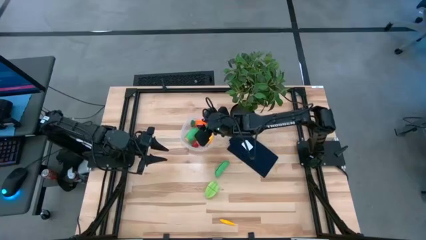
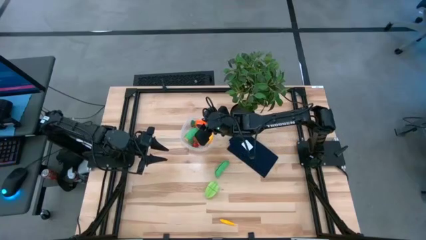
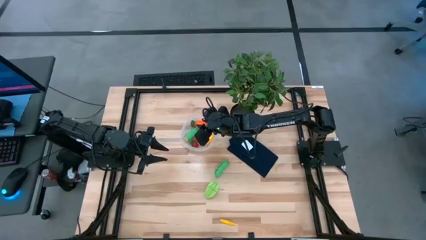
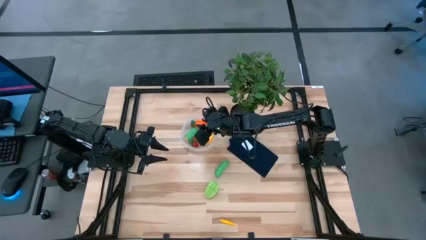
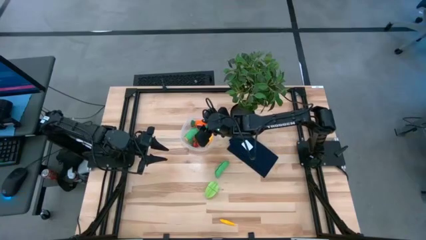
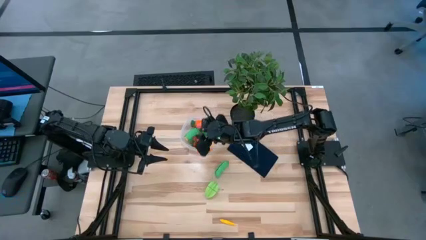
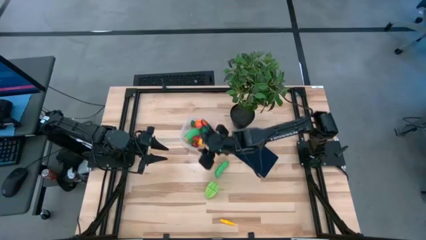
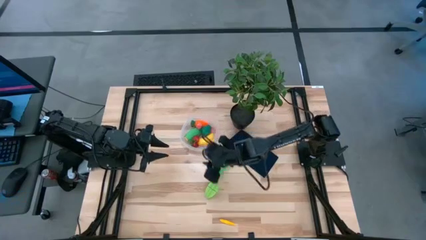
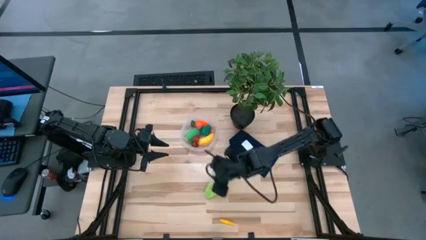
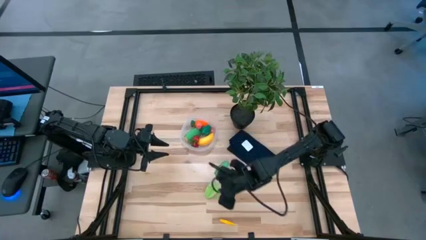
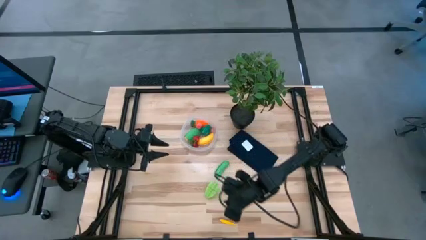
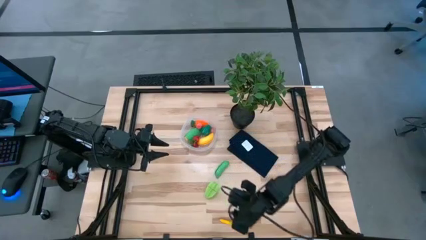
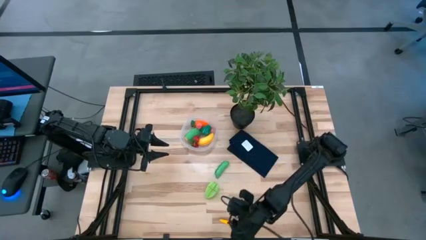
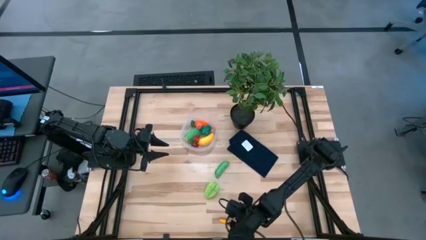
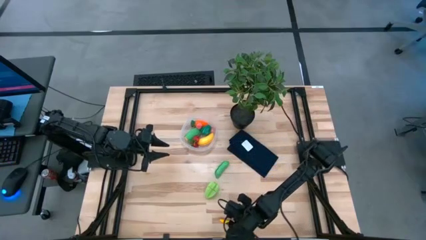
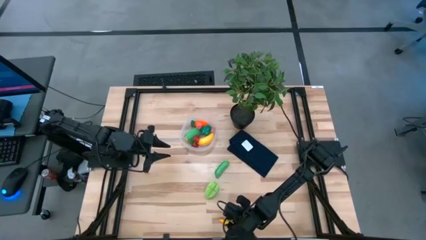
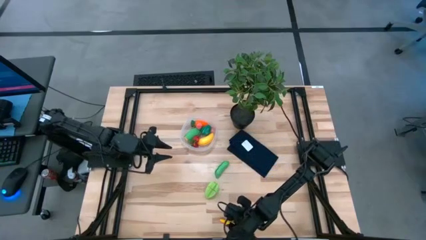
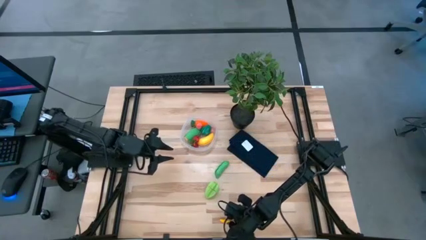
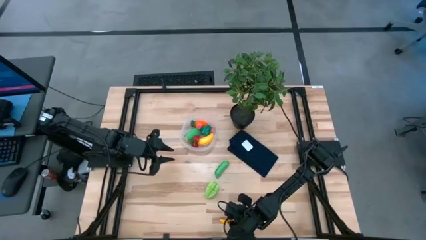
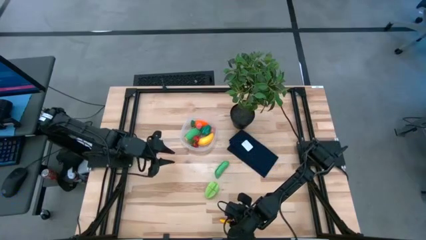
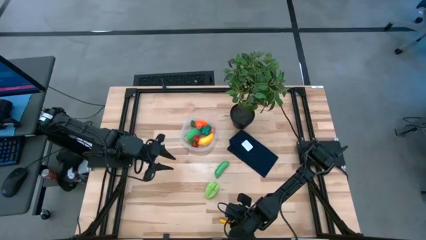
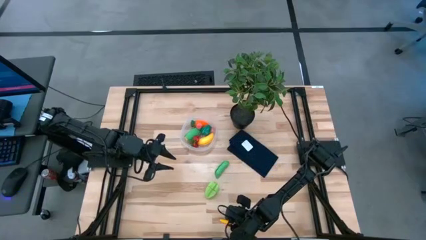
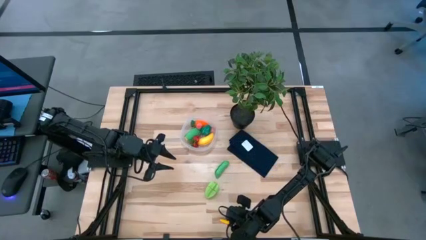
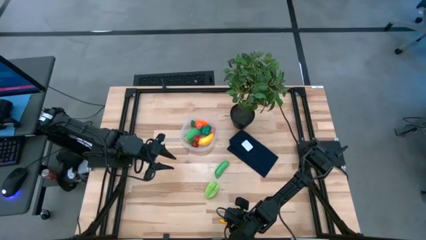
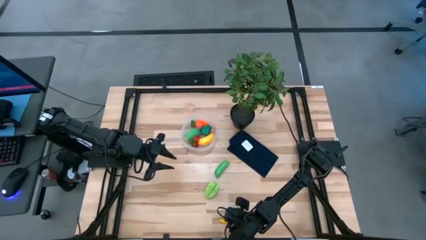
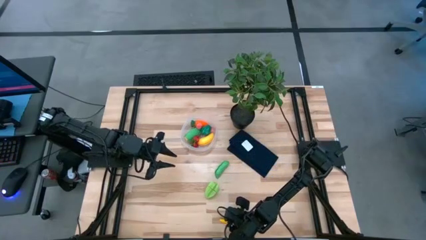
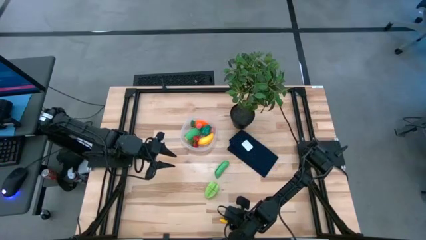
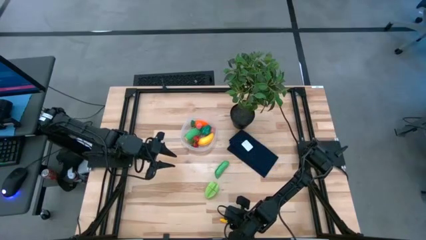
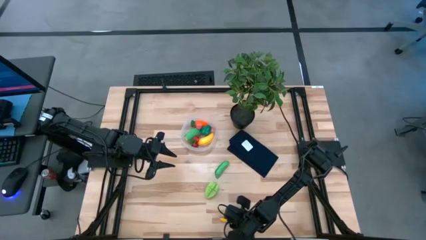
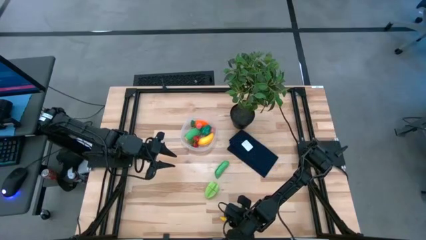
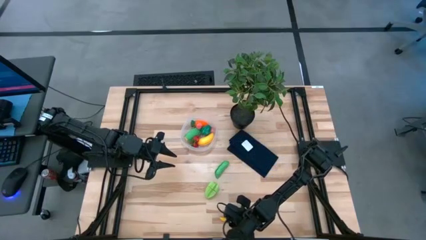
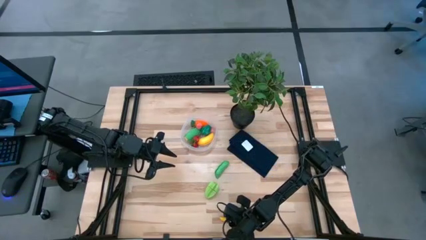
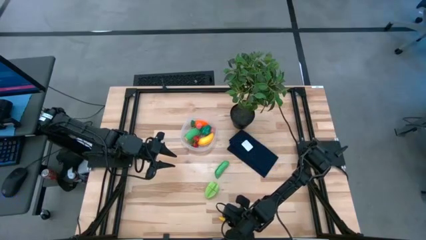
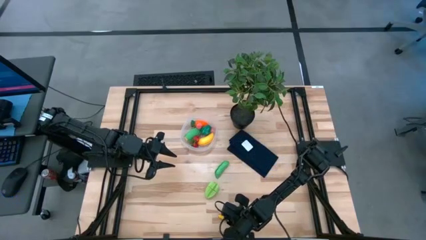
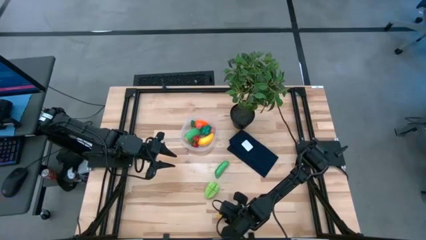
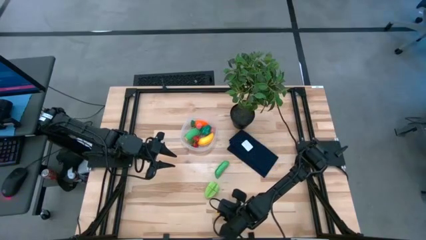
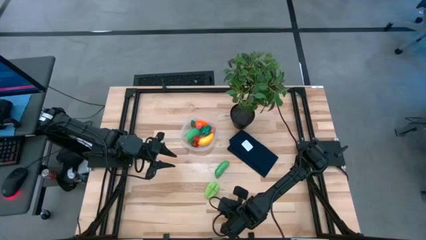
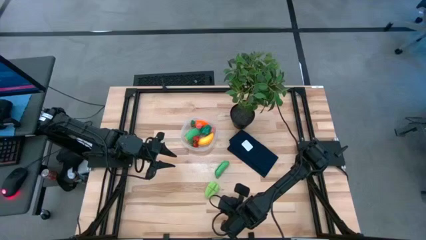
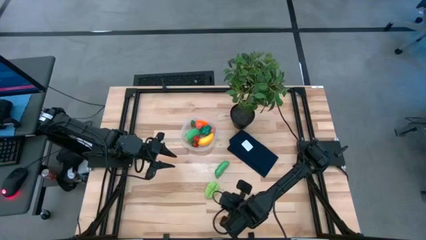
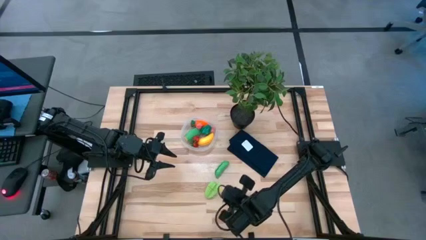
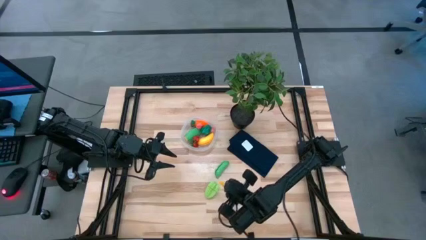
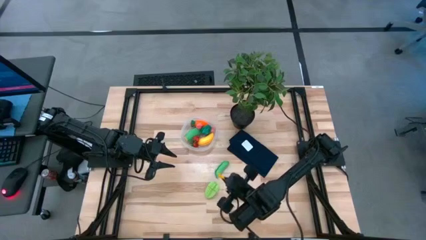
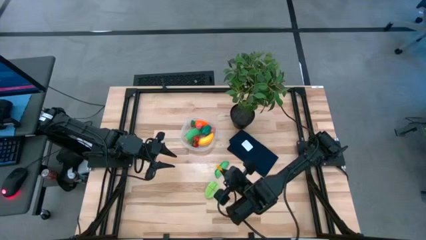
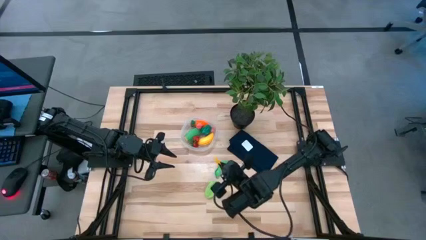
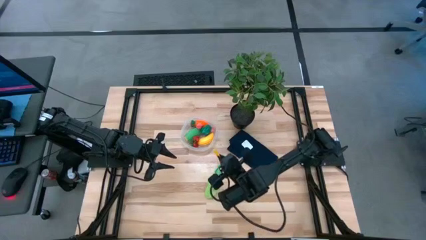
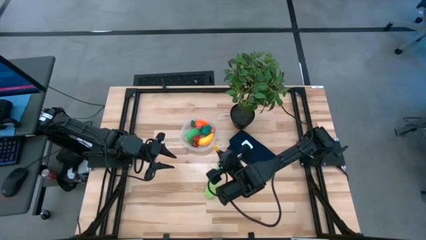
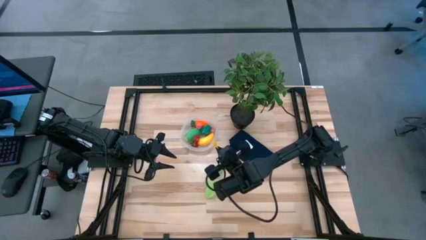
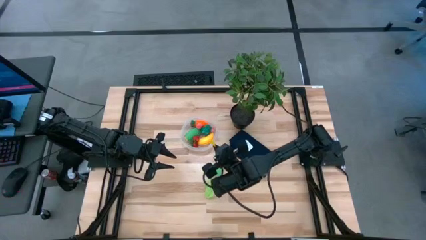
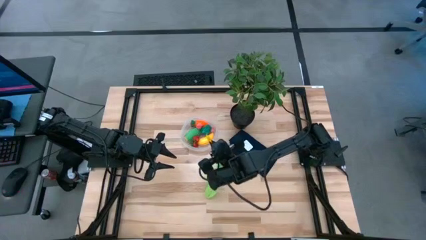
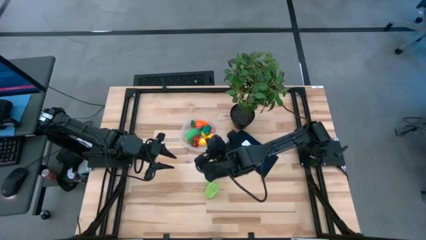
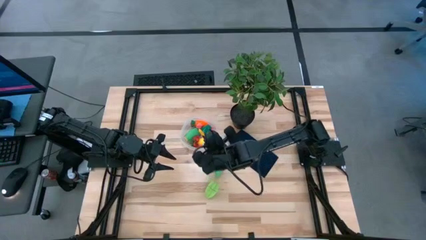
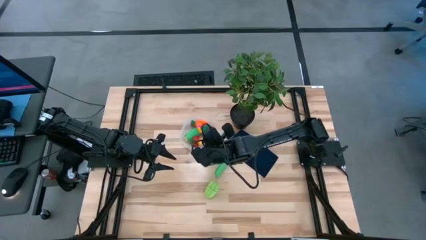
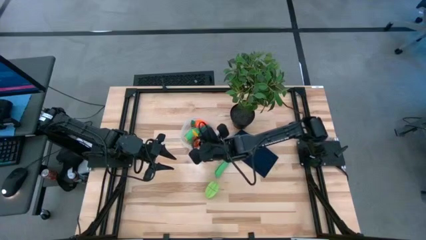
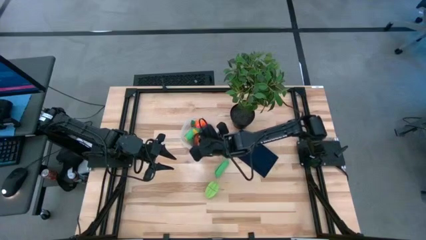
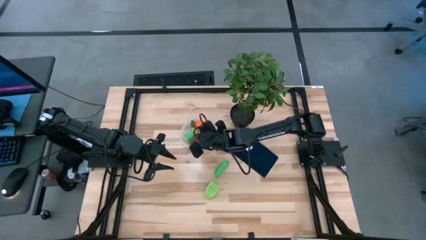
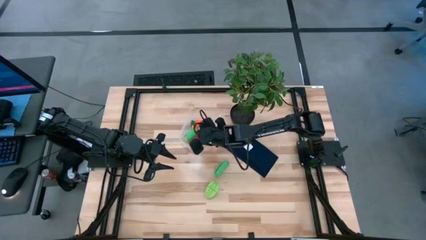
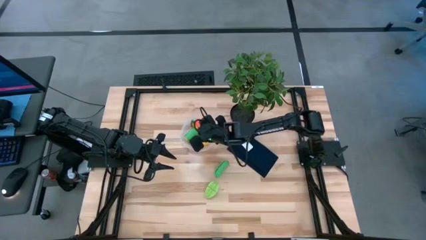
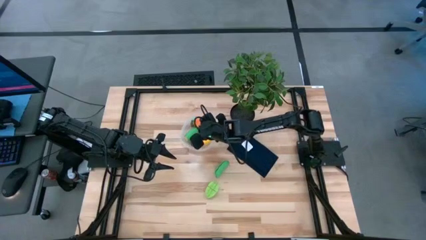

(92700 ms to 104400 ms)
Task: Pick and placing Produce into tupperware
Put the yellow corn into the transparent bin

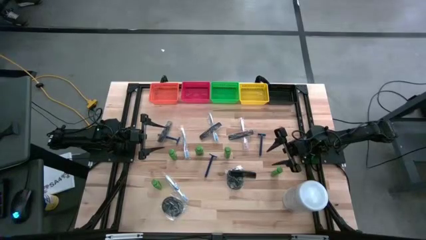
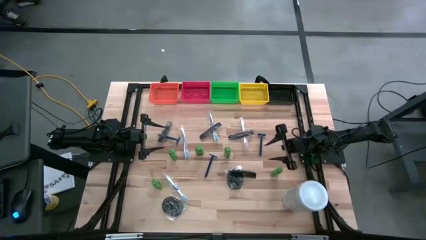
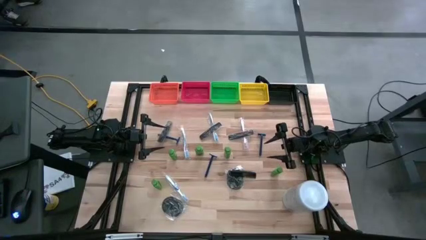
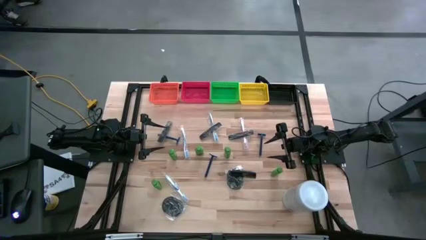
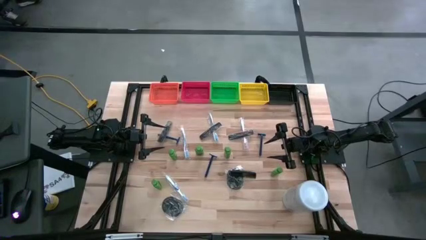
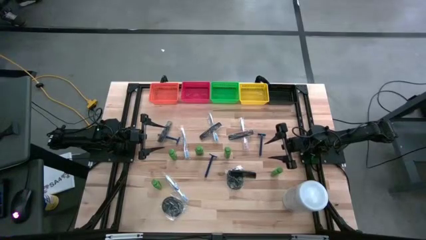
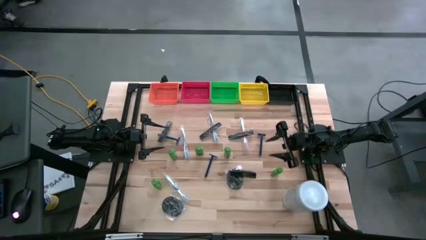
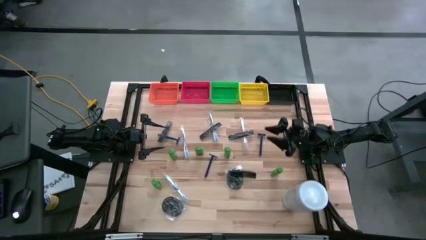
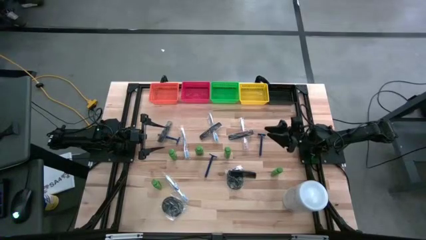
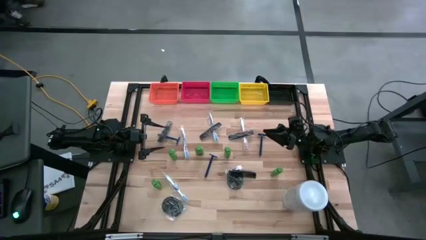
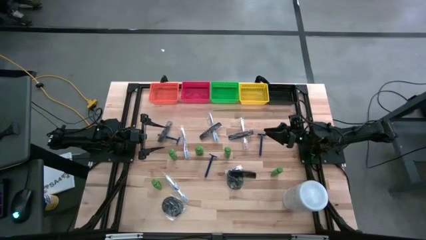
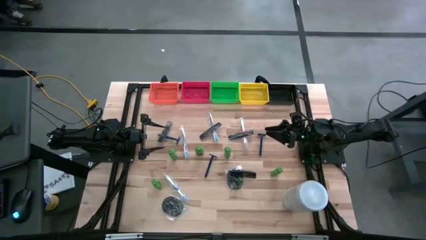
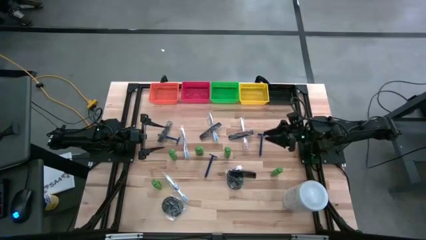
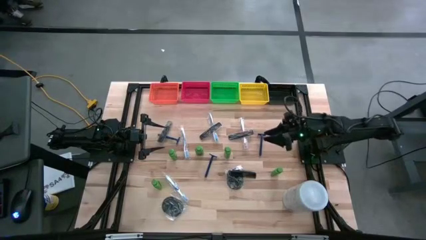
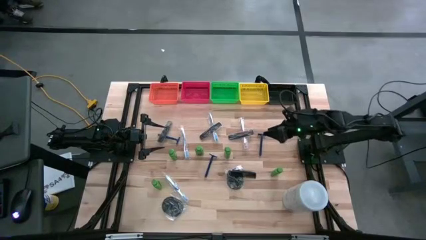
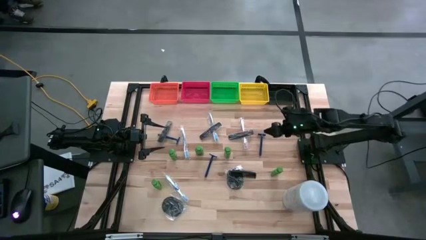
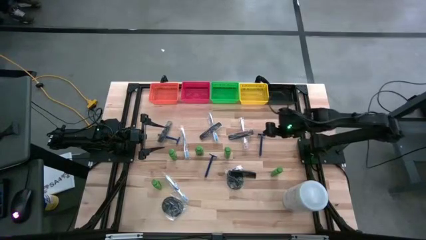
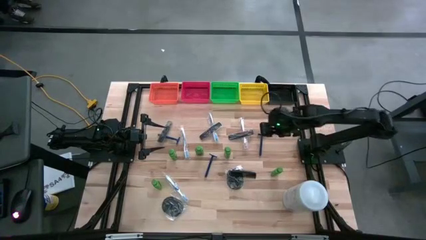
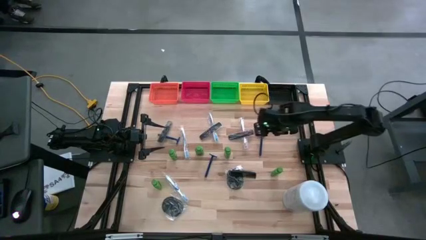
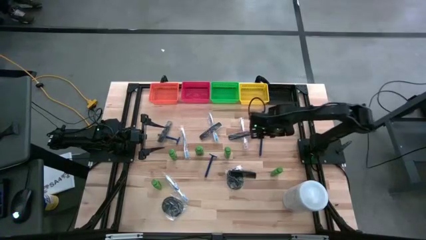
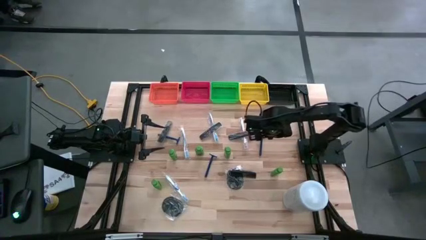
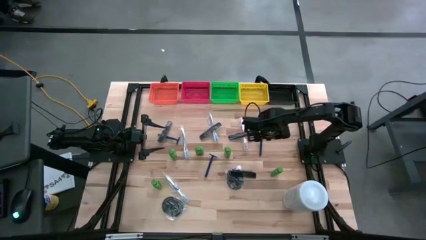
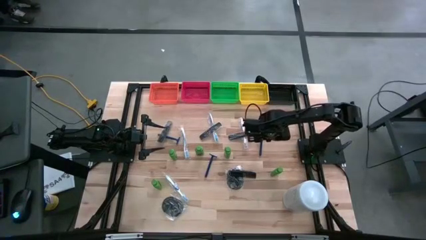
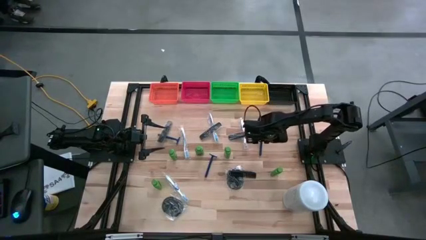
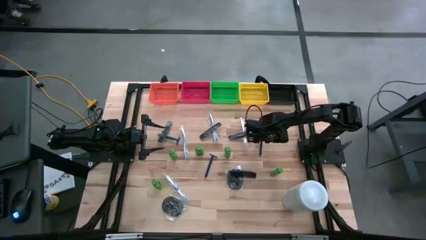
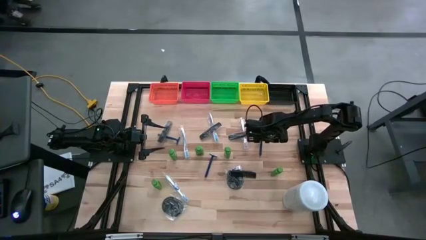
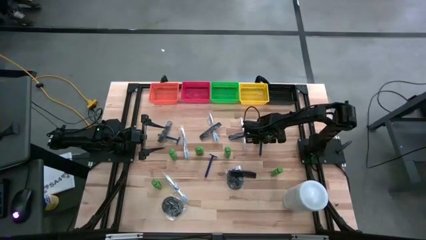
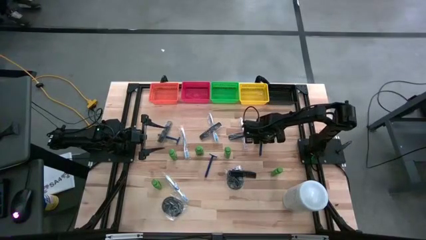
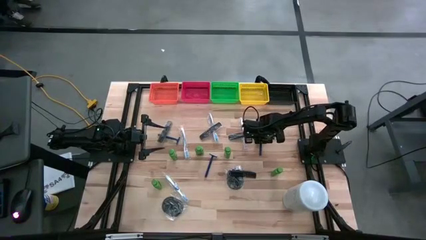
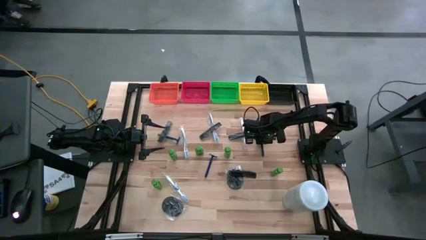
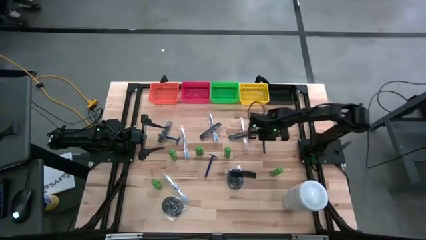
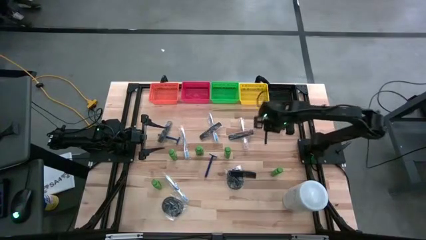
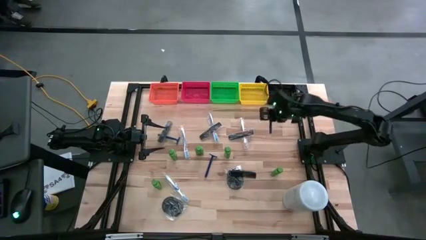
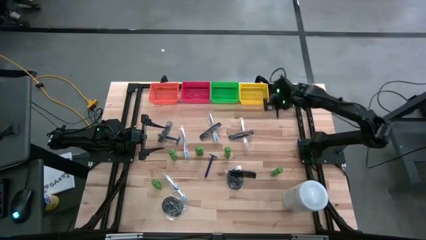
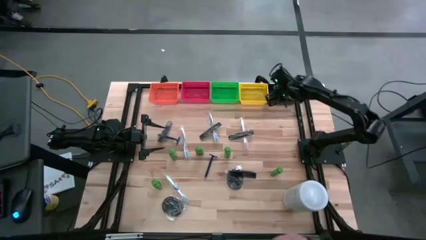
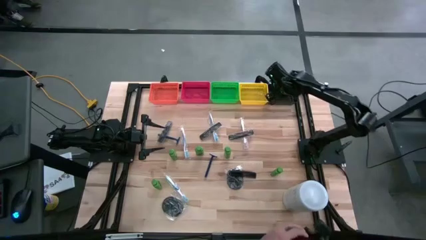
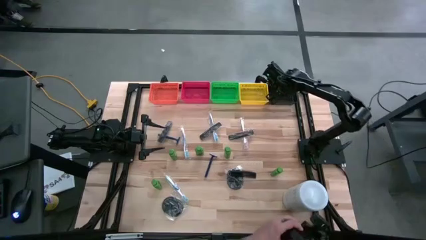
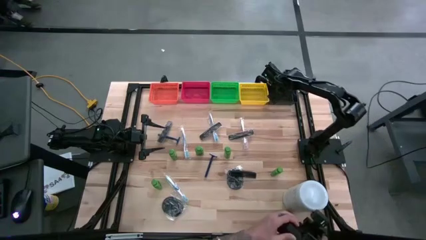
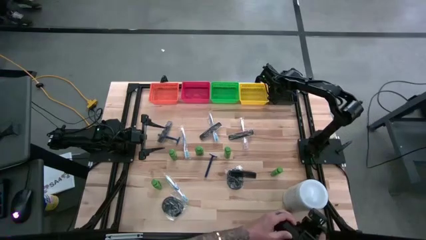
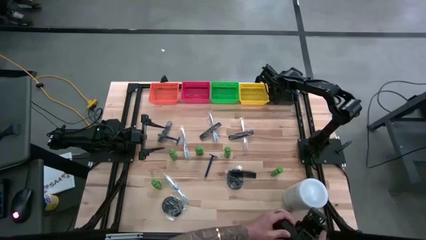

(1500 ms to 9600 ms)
Task: Pick & Place Travel size toiletries
Put the blue razor into the black bin
